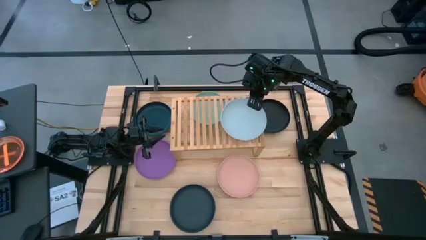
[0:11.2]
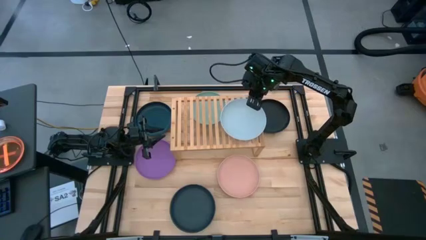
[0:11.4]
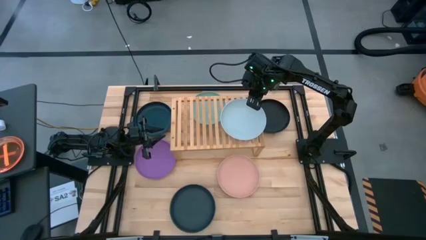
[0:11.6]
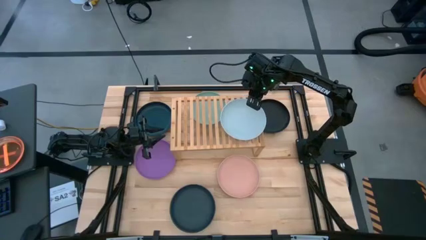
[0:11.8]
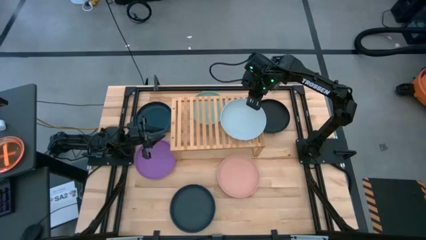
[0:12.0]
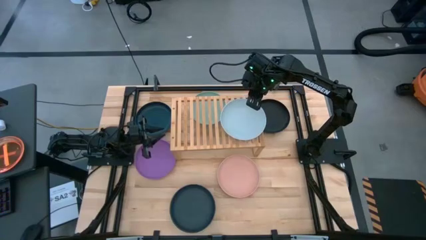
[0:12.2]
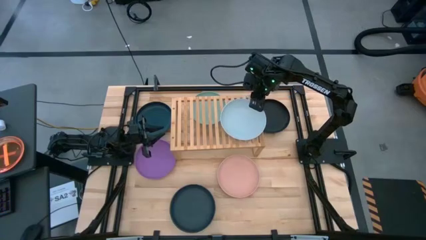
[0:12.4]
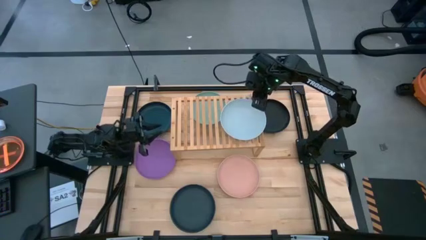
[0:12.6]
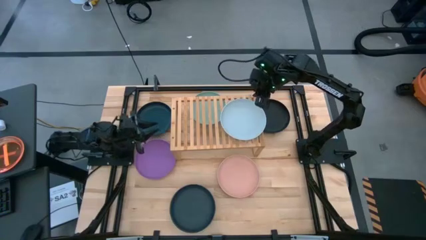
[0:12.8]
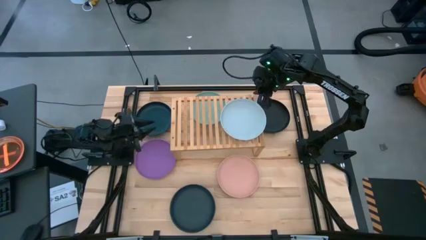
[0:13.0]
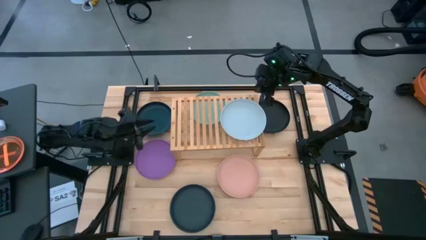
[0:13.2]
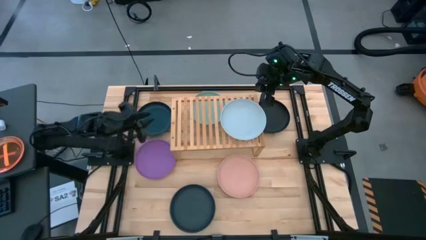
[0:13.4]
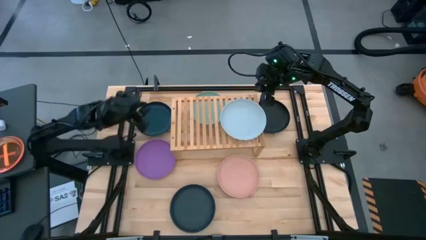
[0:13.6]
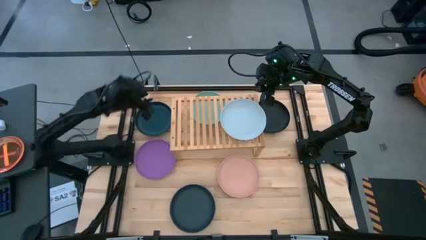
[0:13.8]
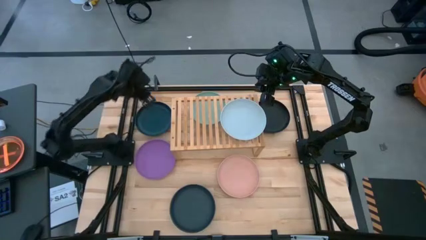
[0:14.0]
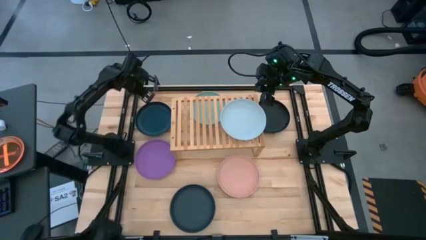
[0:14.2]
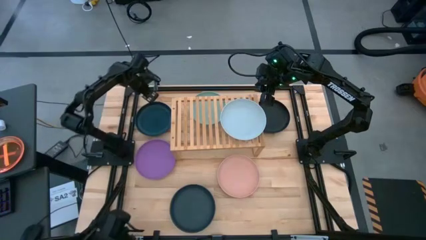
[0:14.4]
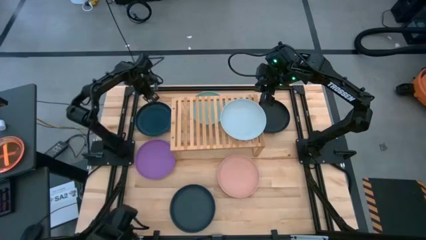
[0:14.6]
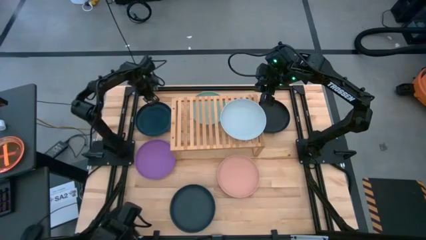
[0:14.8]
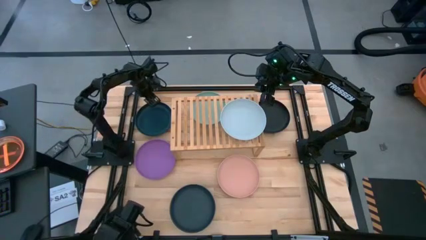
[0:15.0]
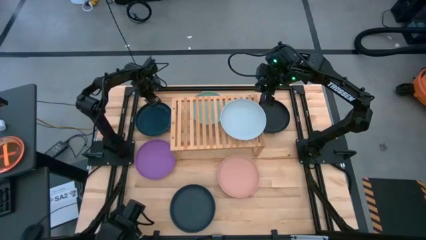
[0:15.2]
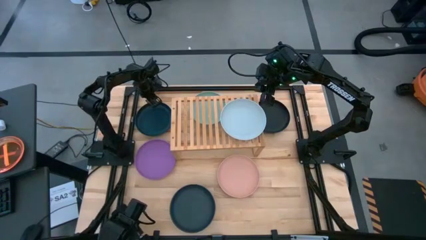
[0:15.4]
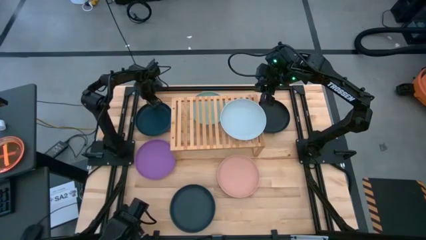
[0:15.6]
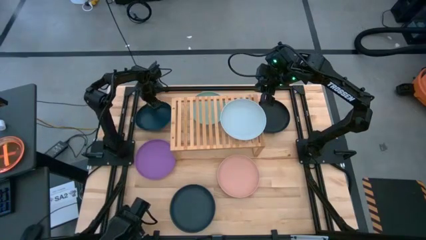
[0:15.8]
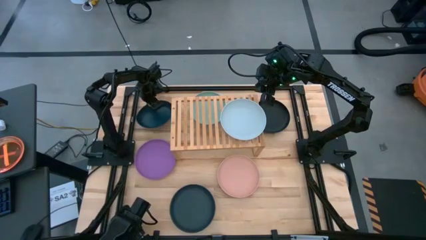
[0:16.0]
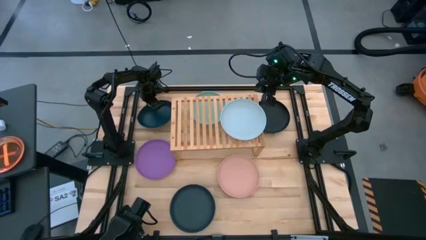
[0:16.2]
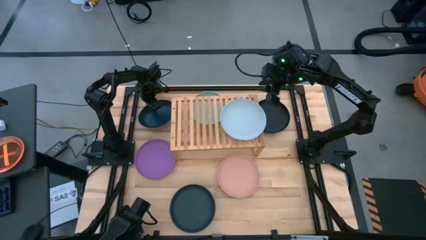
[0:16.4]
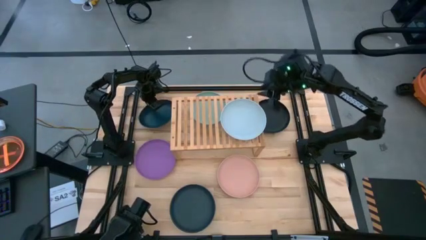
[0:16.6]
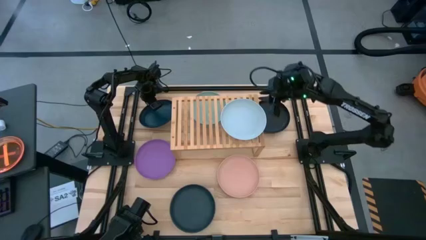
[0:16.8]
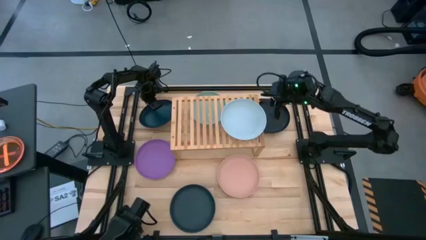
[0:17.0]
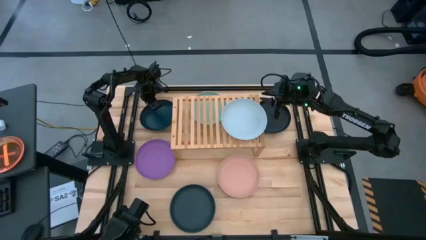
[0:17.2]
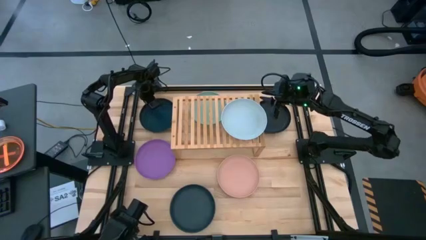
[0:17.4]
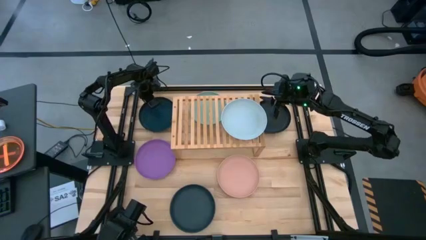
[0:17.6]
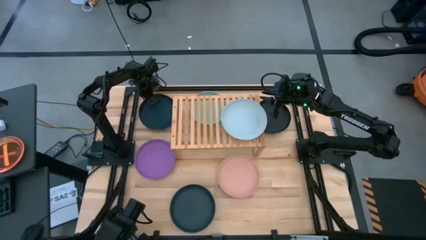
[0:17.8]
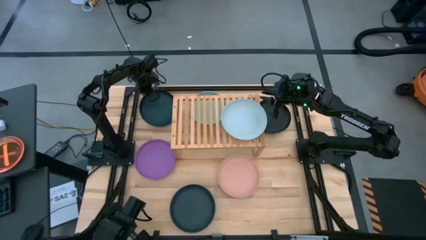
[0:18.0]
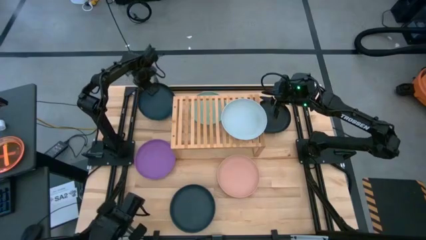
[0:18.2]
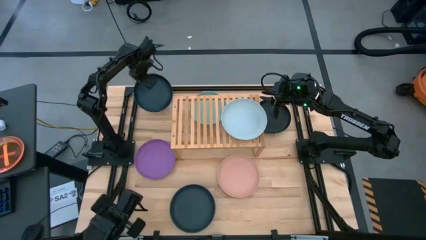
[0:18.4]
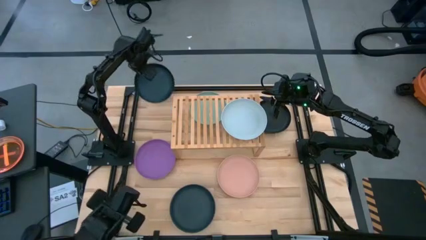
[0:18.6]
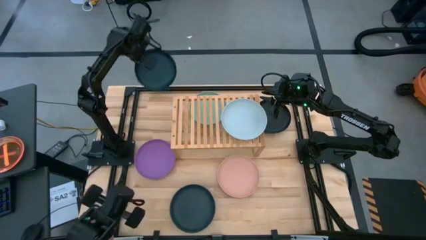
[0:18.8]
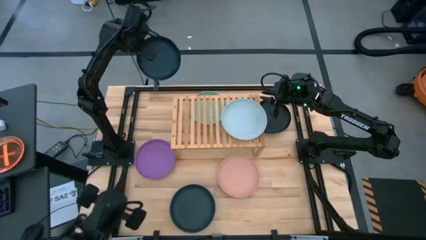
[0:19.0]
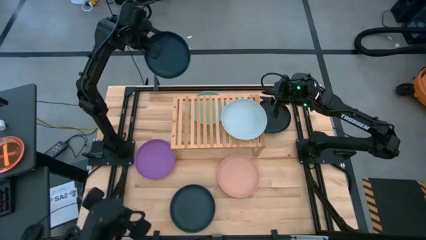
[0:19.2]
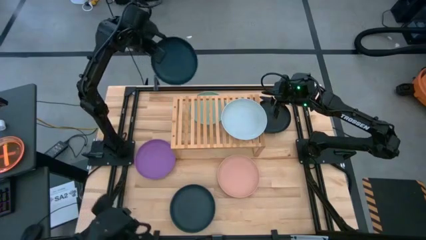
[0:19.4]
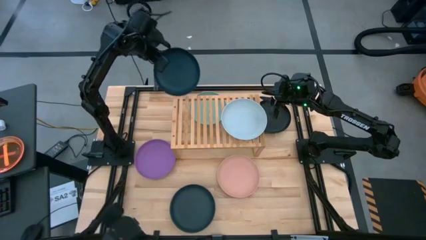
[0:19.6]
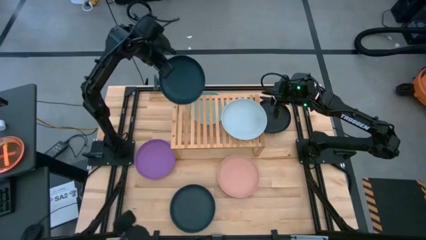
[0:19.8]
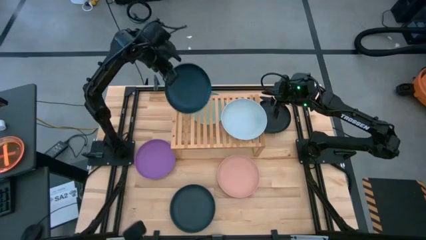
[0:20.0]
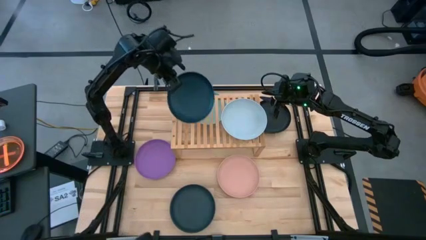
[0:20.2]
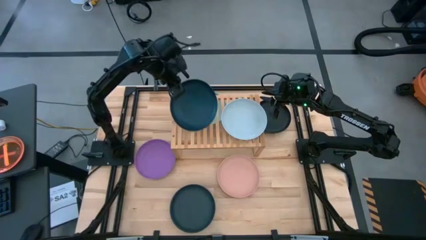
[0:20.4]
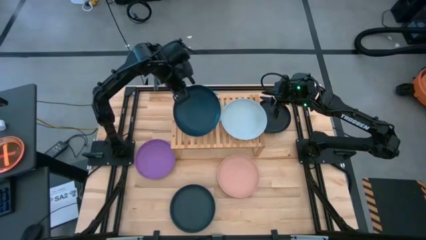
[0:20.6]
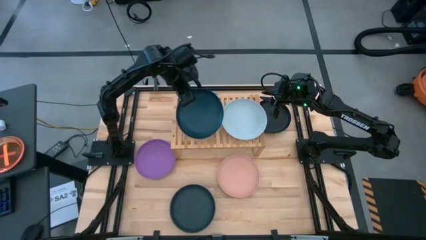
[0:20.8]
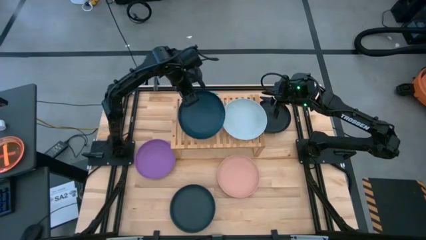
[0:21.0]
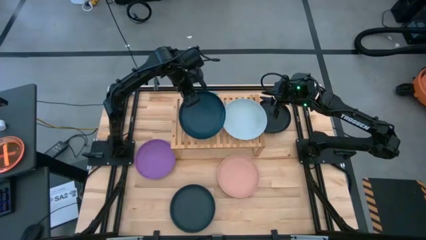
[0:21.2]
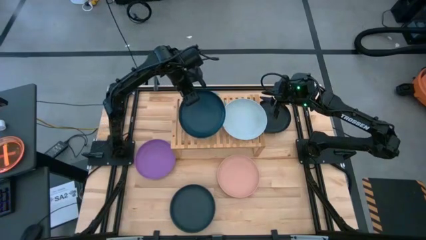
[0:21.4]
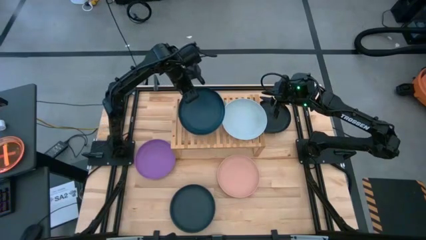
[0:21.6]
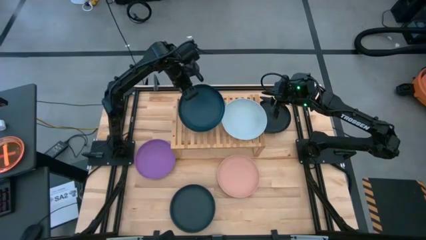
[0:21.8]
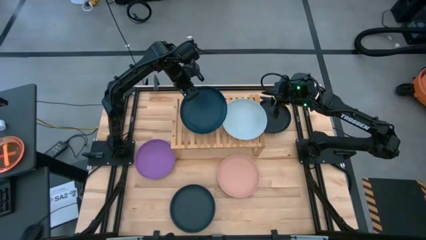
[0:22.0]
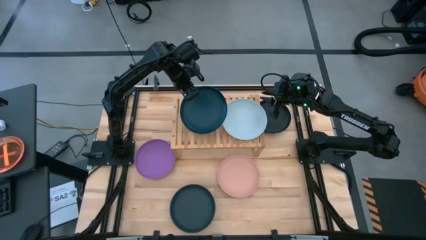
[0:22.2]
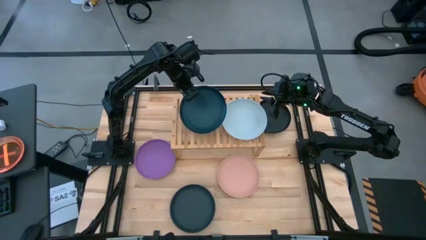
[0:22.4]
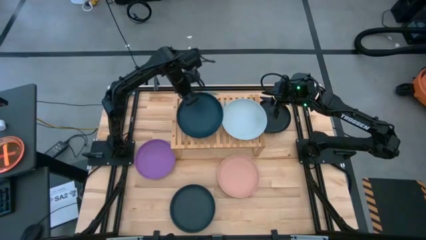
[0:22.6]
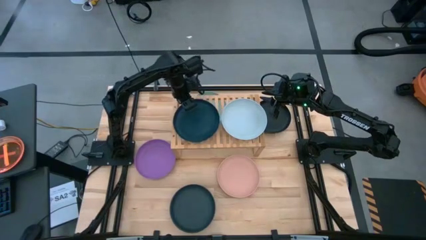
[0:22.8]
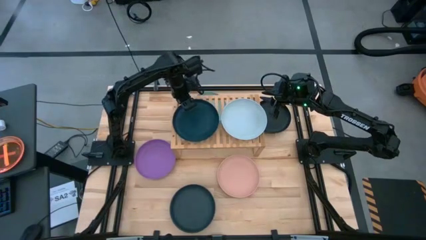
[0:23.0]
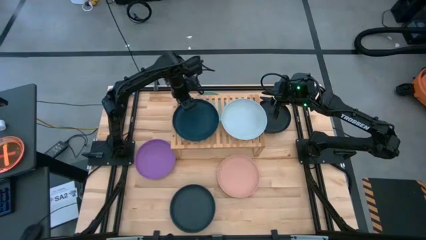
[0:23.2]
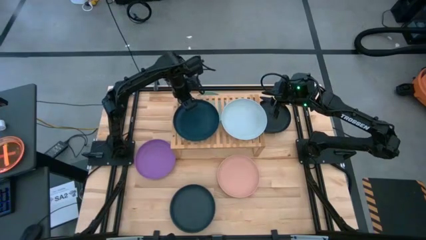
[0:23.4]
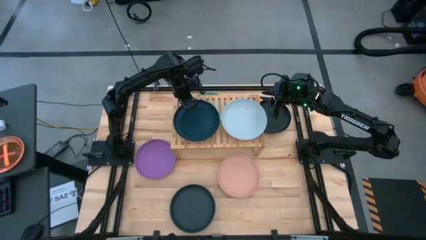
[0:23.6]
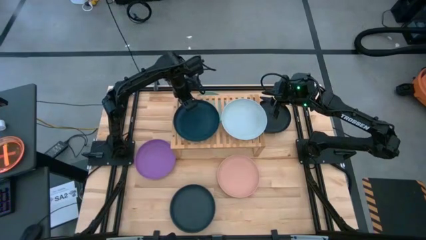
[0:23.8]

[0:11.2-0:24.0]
Task: Place and stack plates onto a shelf
Put the top left black plate on the shelf

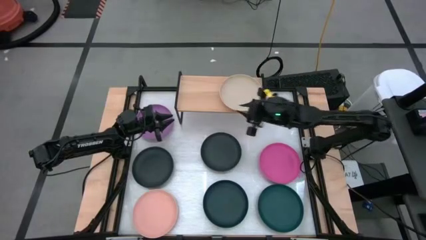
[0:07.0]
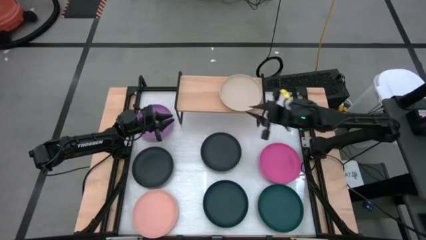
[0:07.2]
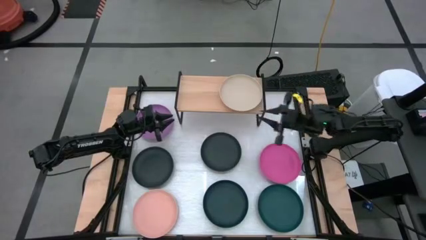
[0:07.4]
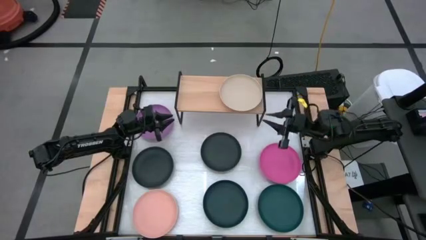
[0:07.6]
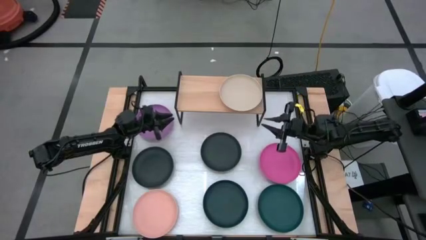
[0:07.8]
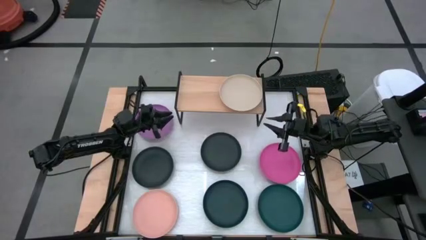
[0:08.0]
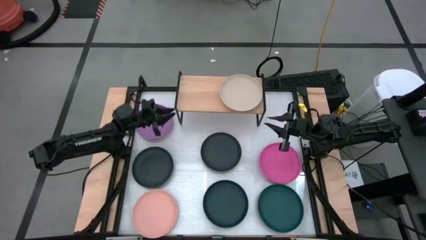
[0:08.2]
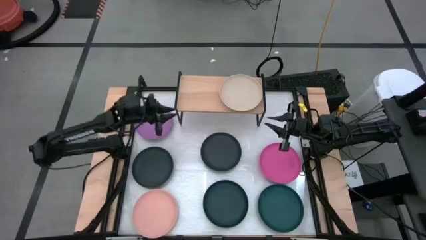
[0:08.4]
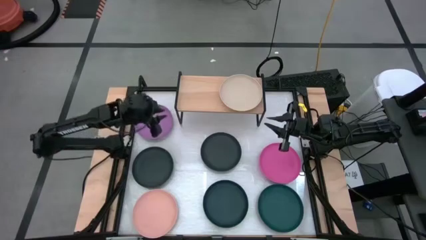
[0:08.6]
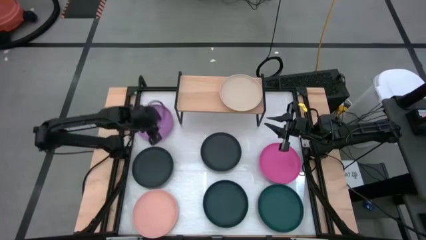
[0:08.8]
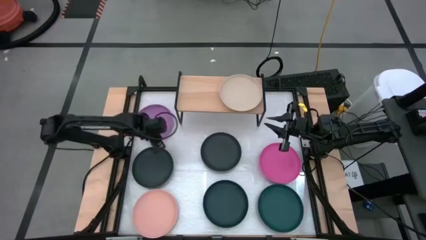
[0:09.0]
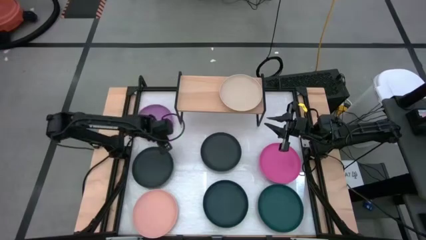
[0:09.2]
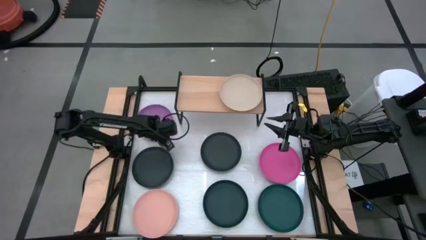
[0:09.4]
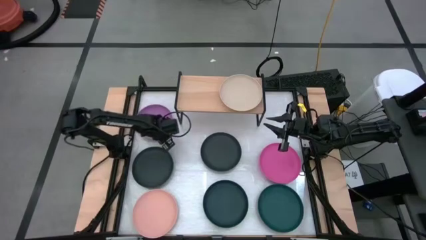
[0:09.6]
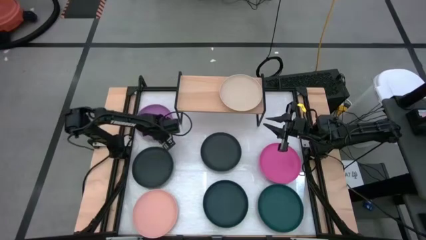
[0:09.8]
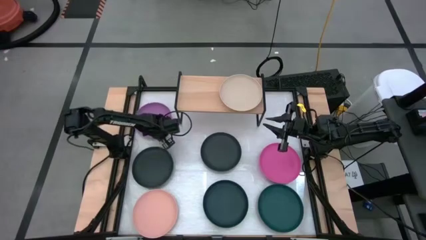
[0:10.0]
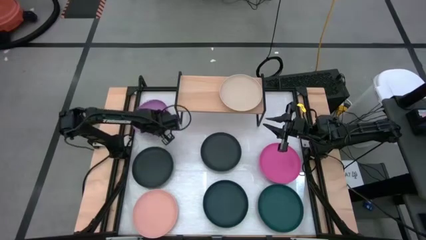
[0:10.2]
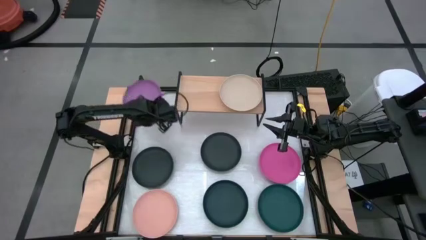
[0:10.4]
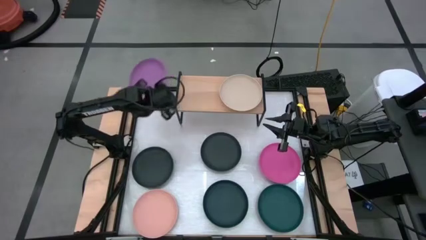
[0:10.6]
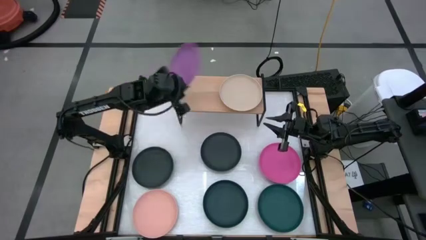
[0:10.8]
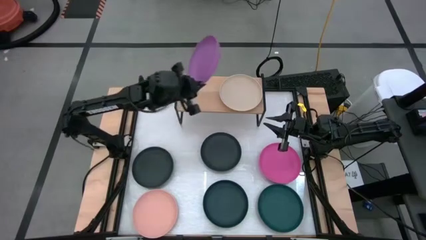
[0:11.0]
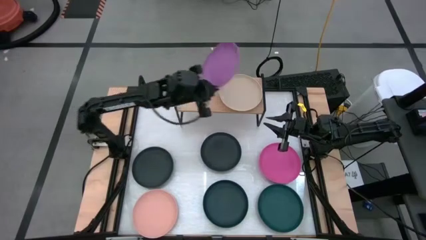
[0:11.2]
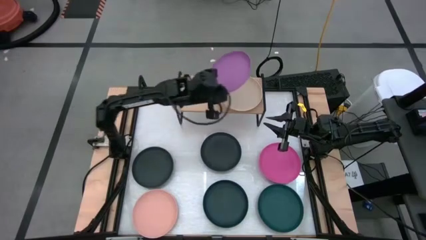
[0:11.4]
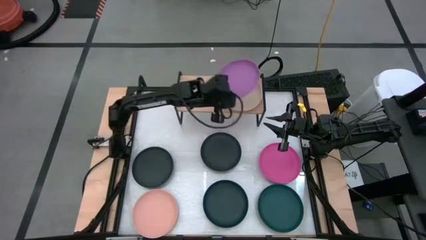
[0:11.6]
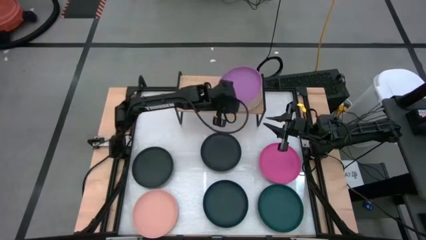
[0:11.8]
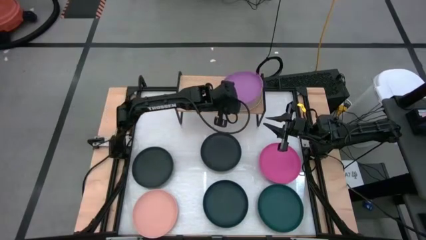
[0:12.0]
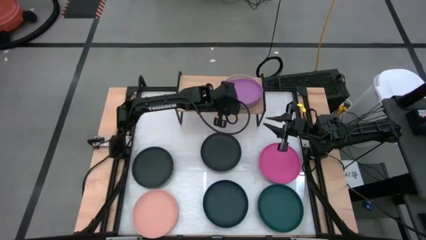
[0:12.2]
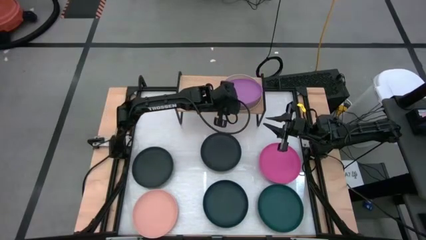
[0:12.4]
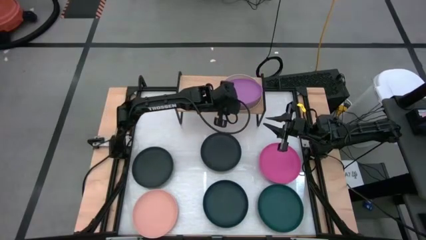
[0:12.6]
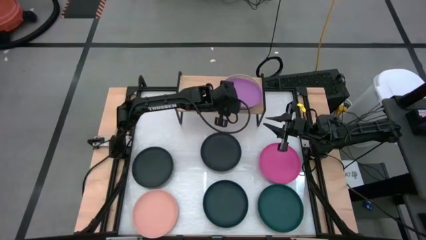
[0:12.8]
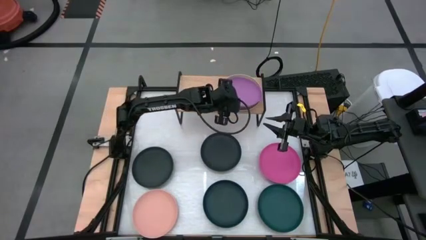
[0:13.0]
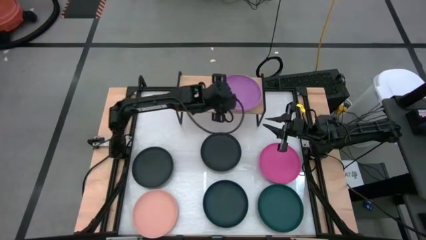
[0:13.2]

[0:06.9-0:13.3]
Task: Place and stack plates onto a shelf
Stack the purple plate on top of the light brown plate on the shelf
